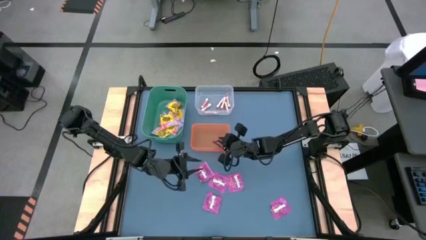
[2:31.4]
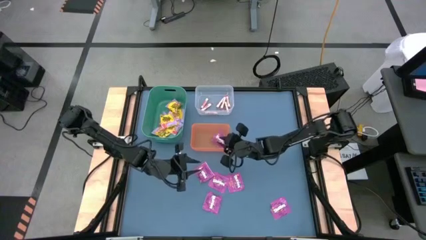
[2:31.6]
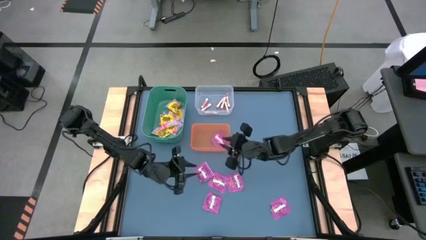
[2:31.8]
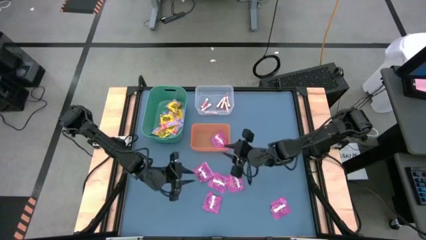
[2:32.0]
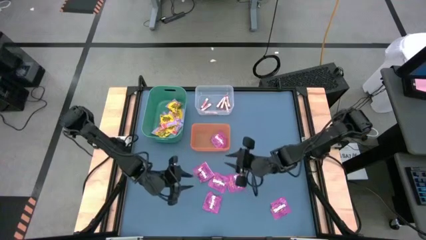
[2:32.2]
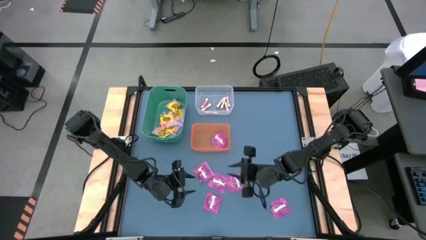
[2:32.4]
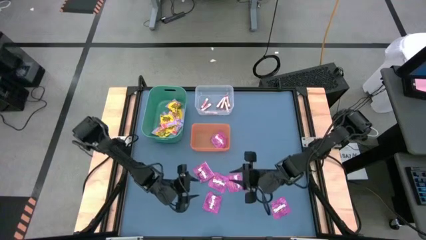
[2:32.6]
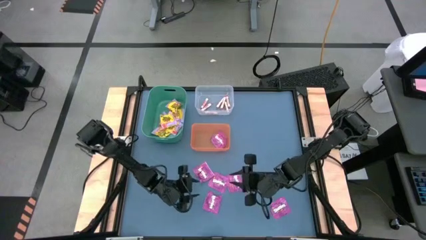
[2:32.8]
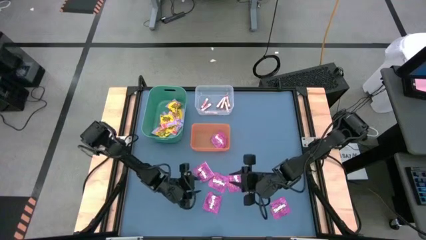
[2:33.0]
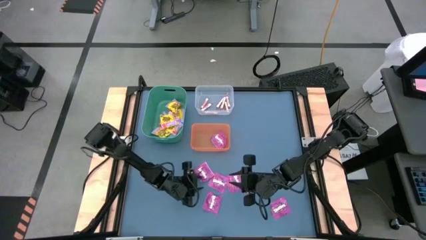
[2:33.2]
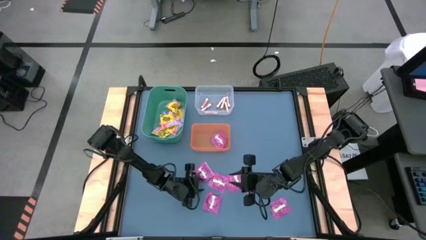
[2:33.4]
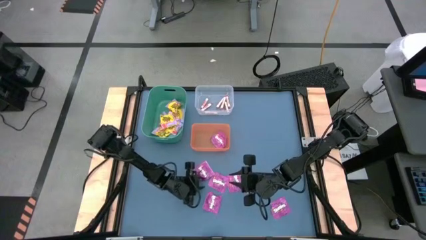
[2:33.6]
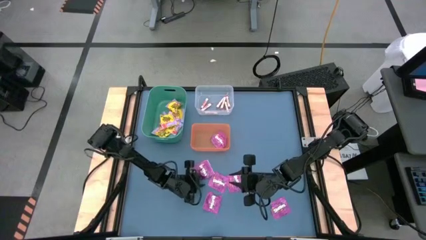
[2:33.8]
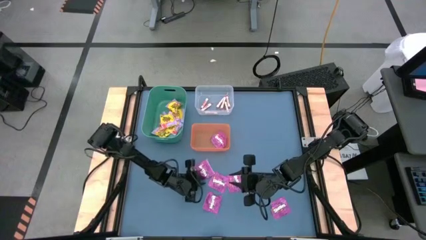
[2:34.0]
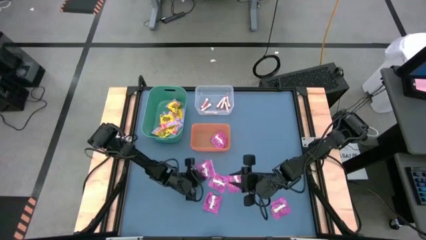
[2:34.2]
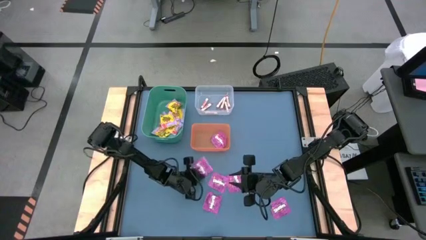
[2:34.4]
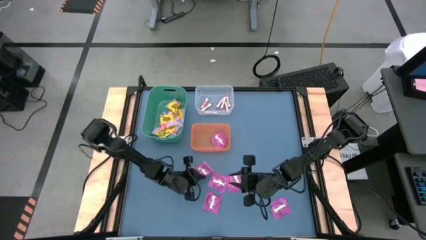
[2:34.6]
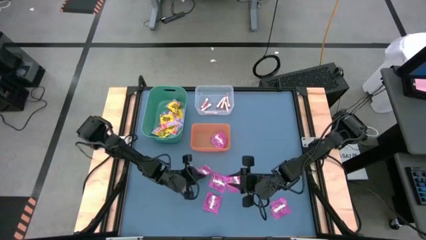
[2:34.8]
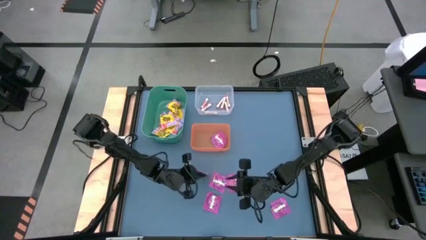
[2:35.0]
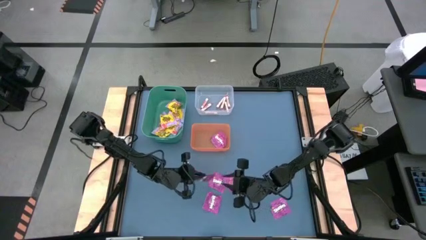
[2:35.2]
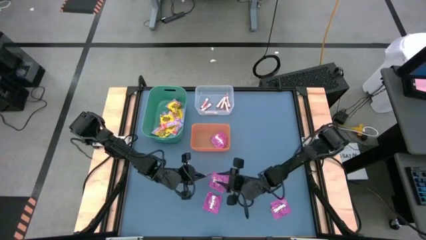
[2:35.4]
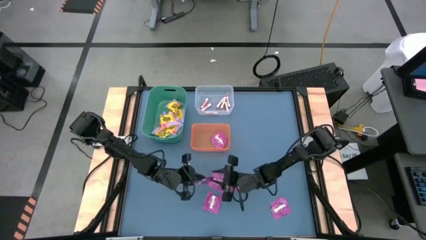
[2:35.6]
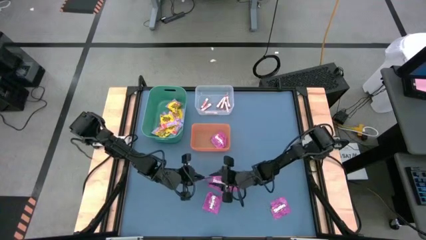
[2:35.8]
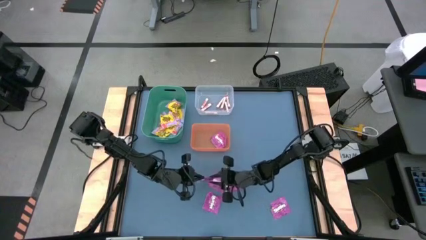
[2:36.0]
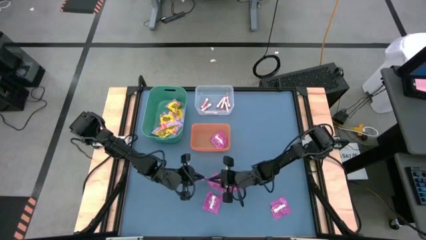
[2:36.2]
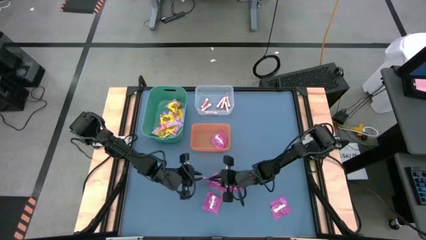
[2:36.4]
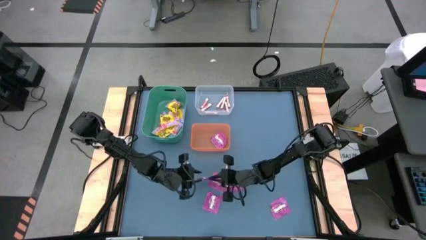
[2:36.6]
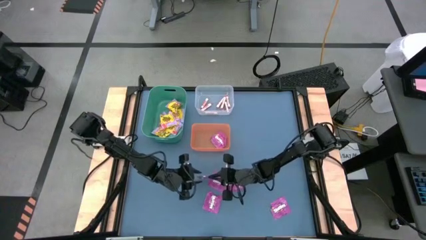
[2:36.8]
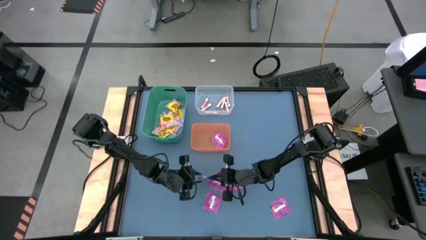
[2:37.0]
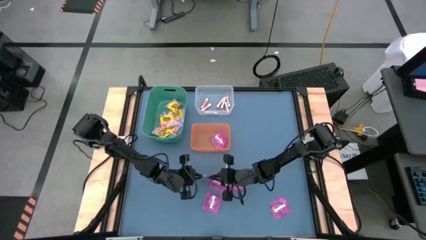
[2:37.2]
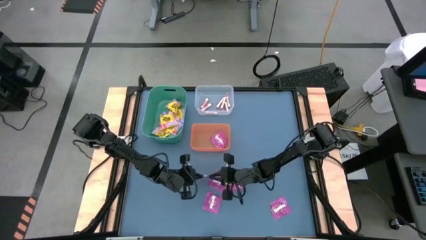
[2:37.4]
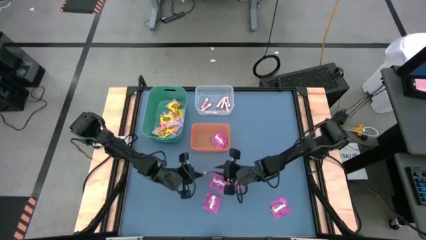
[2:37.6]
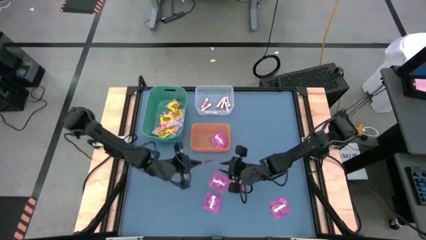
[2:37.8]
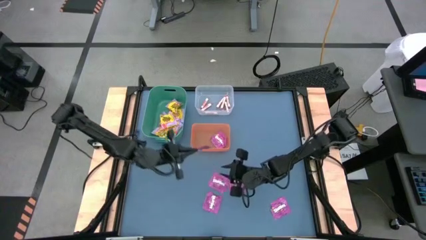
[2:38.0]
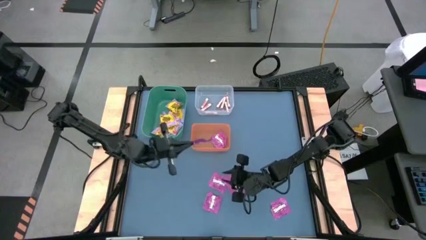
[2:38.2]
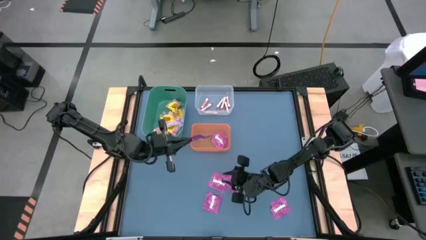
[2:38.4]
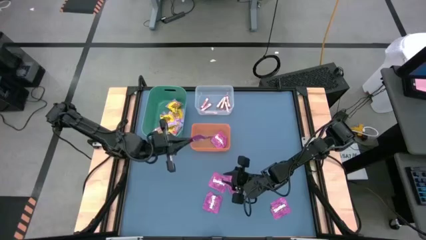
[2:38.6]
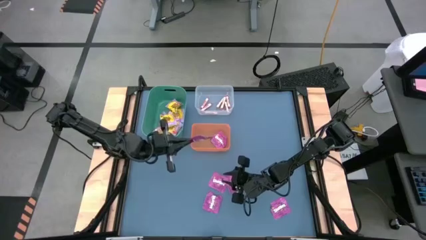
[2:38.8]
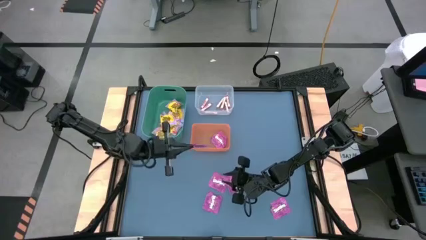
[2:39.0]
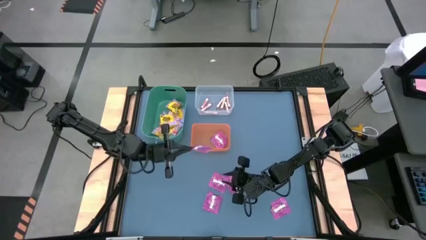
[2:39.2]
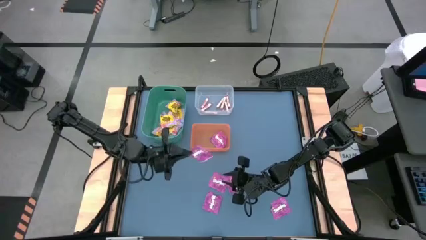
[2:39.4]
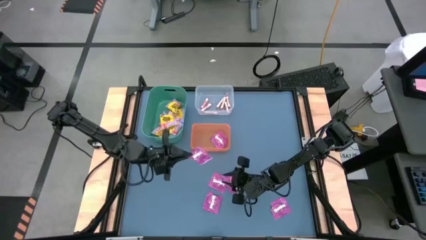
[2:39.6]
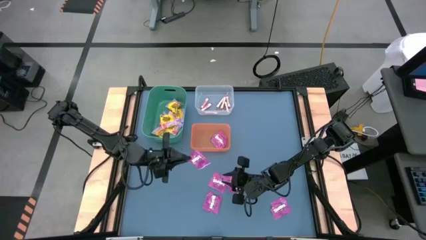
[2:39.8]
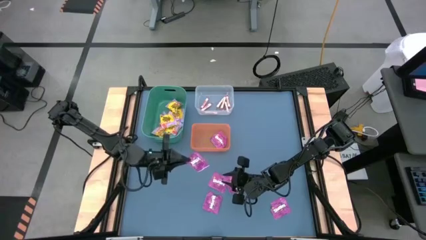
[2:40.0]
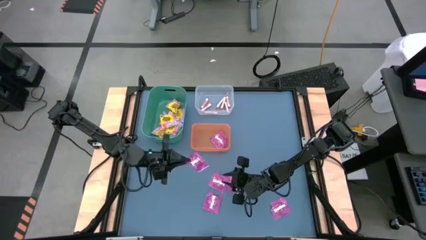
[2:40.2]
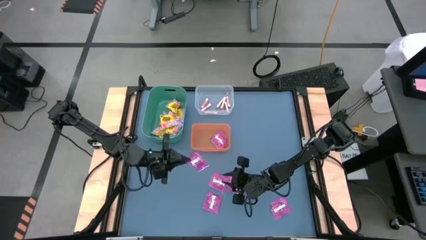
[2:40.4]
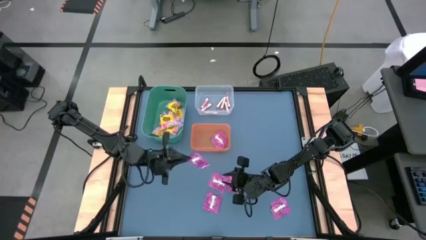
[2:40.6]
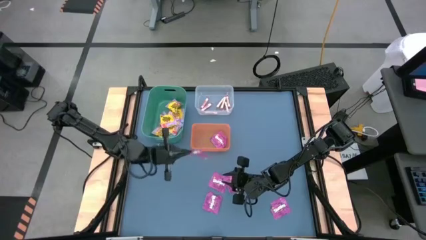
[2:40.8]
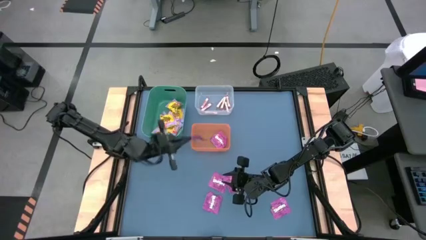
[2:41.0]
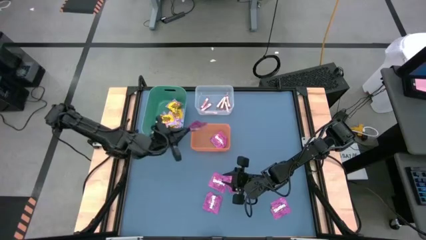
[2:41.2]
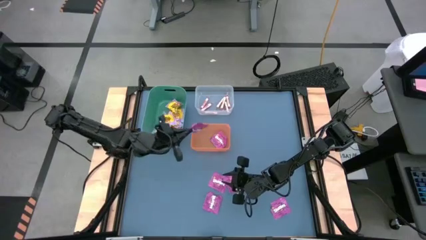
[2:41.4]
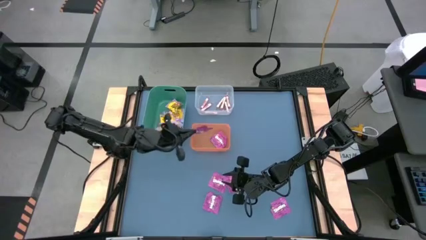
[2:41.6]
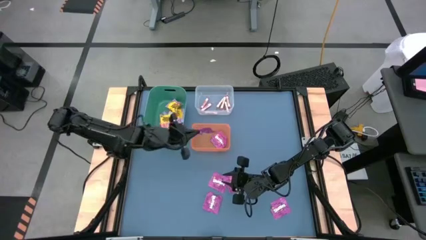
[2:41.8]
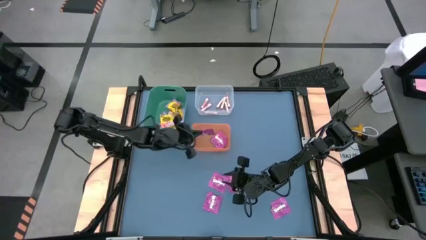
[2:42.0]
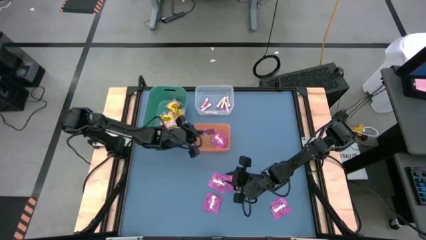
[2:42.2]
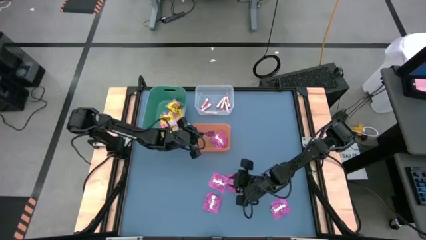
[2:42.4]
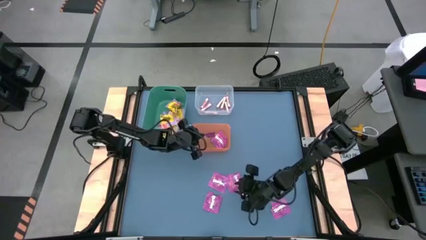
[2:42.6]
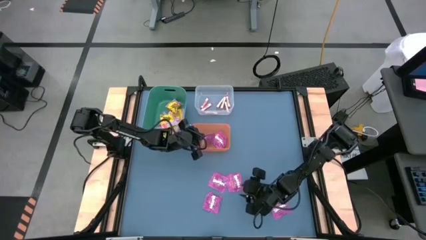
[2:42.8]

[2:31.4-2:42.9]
Task: Sort candy
Put the violet candy into the orange bin

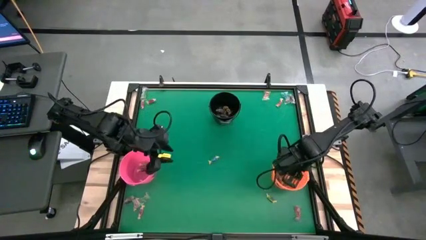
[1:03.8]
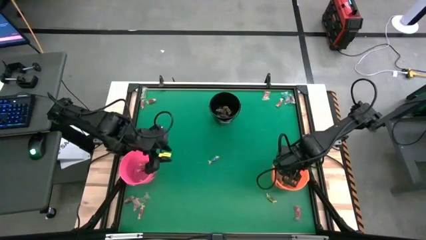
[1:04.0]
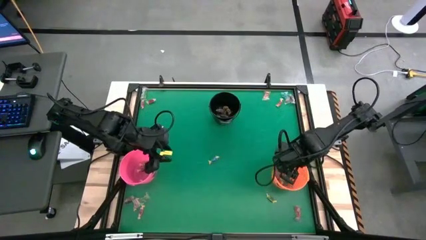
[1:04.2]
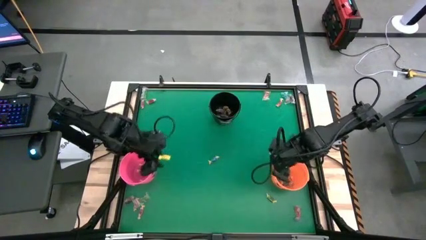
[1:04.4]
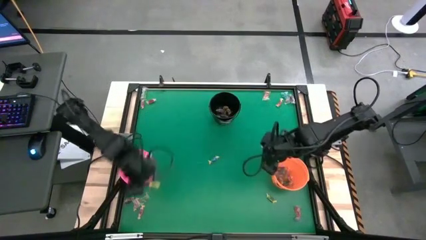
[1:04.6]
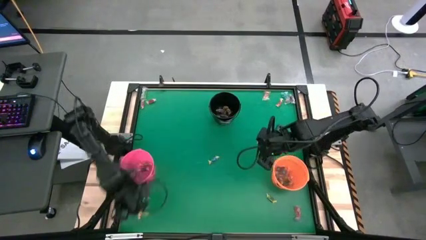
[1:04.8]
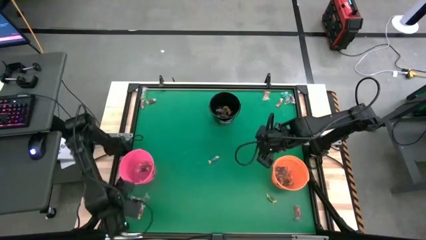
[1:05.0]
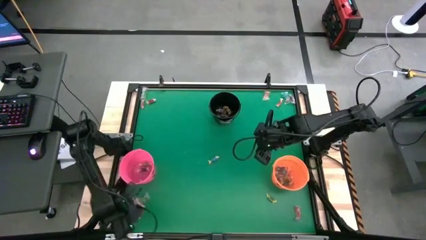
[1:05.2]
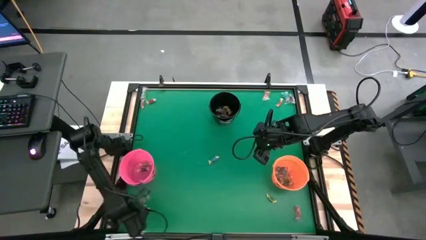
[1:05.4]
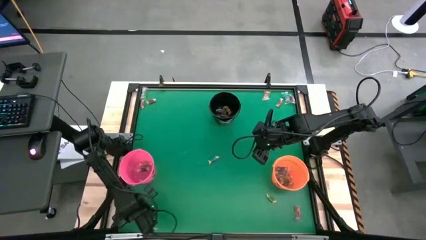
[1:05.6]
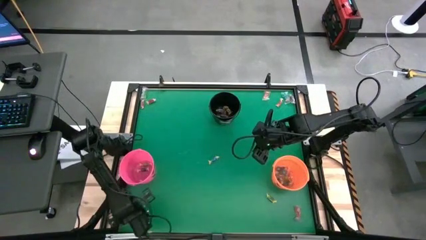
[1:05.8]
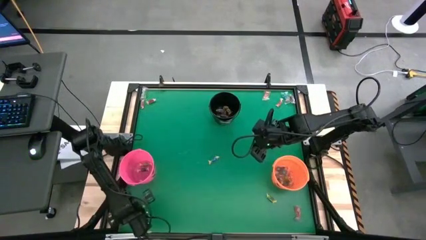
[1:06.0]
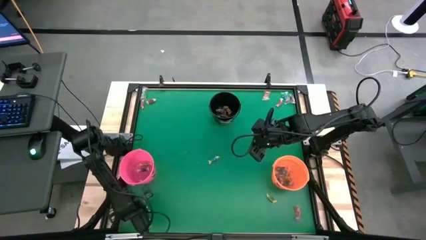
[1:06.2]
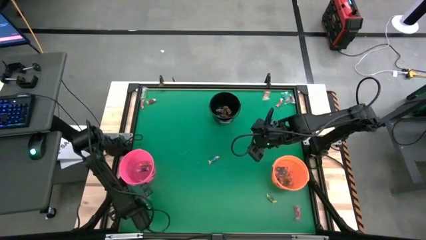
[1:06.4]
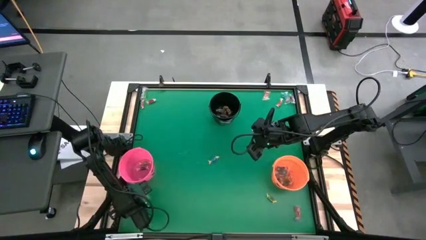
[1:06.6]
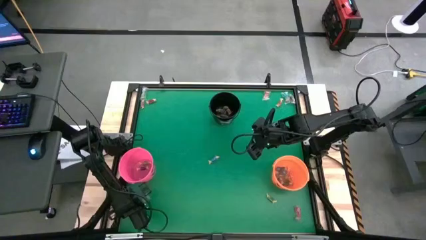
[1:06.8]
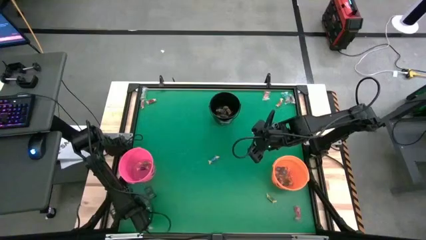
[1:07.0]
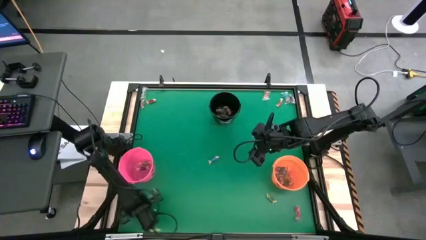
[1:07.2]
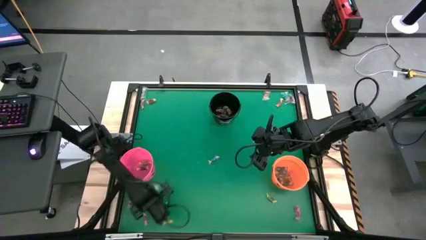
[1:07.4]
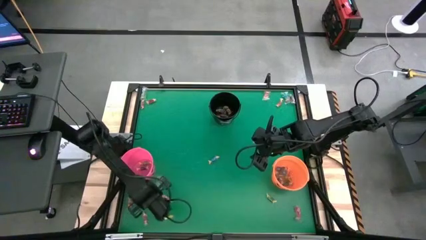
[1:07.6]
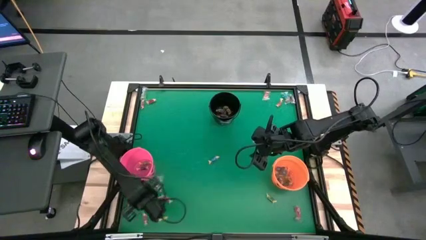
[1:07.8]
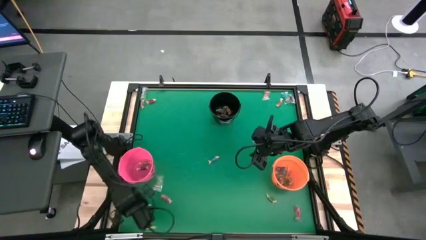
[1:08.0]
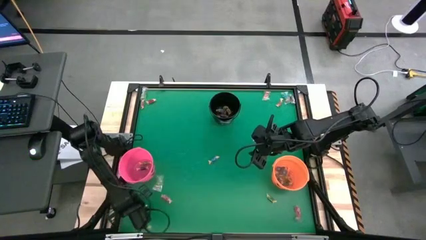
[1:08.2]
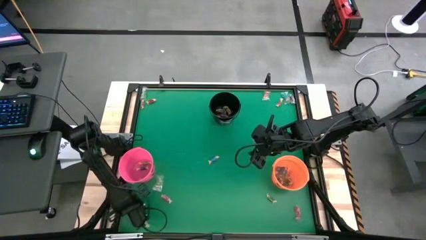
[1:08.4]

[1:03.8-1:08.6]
Task: Sort candy by brand, put in halloween buckets
Put the transparent candy into the black bucket
